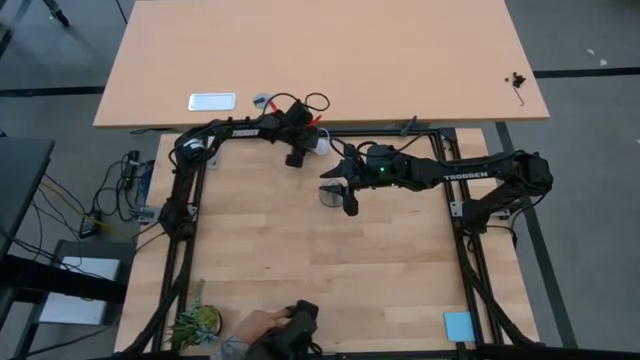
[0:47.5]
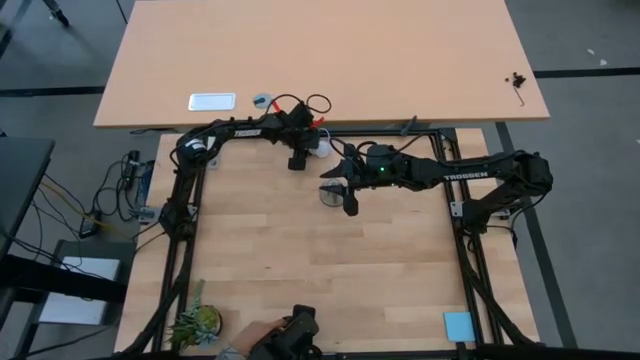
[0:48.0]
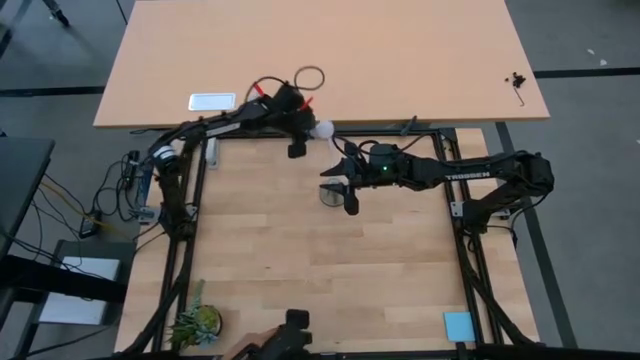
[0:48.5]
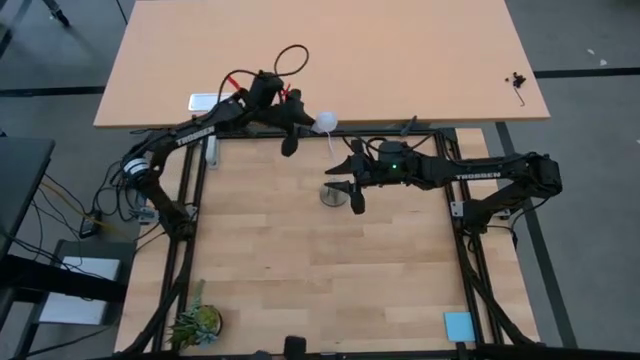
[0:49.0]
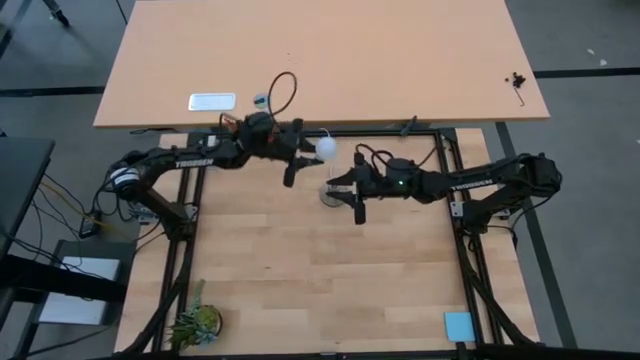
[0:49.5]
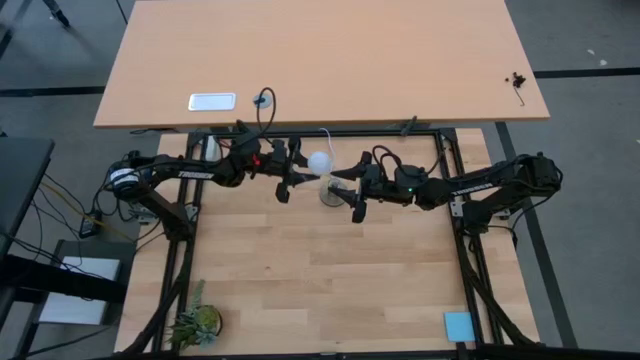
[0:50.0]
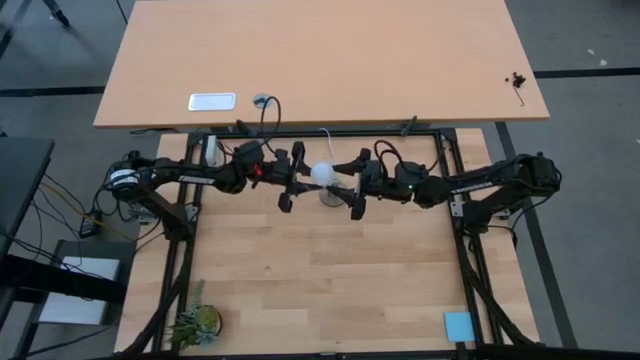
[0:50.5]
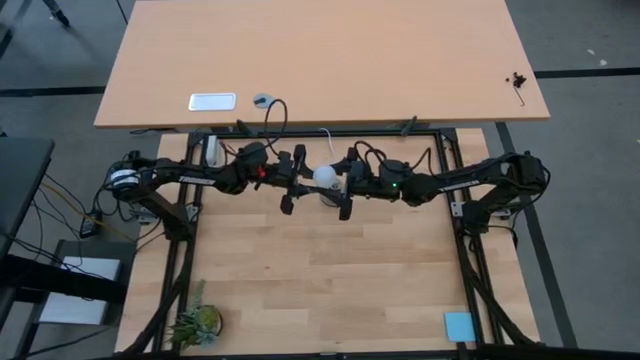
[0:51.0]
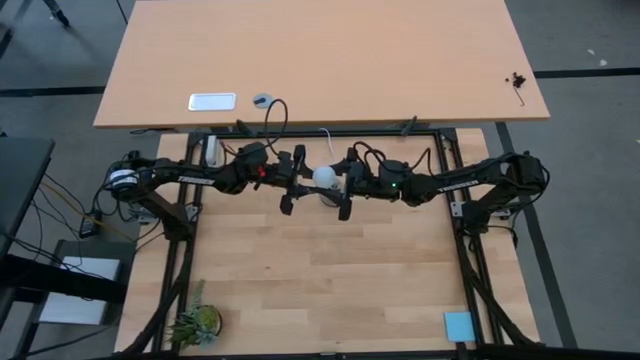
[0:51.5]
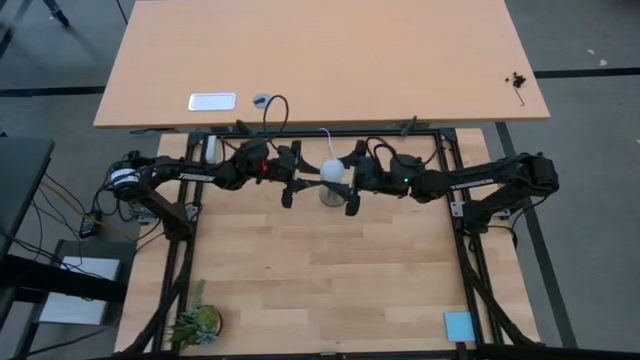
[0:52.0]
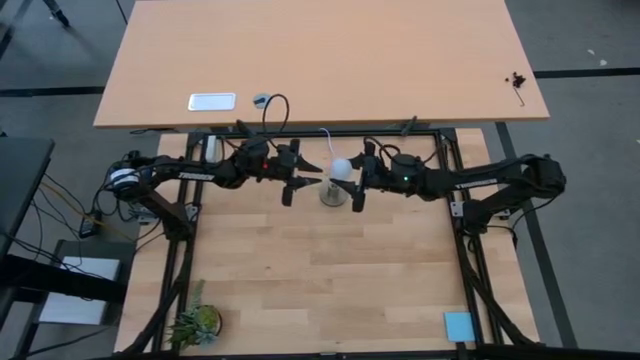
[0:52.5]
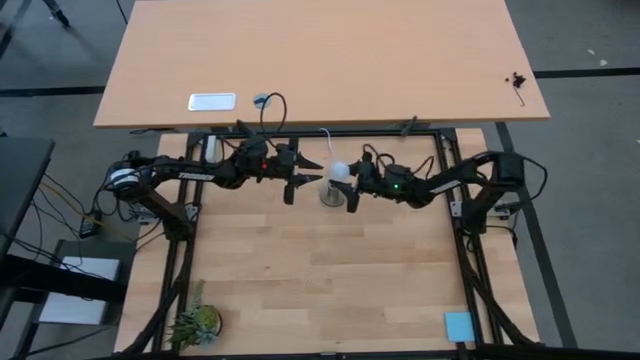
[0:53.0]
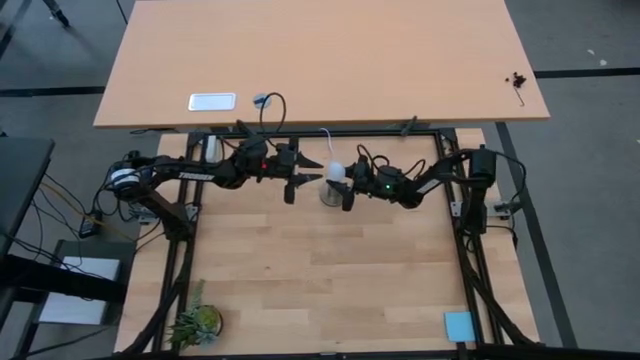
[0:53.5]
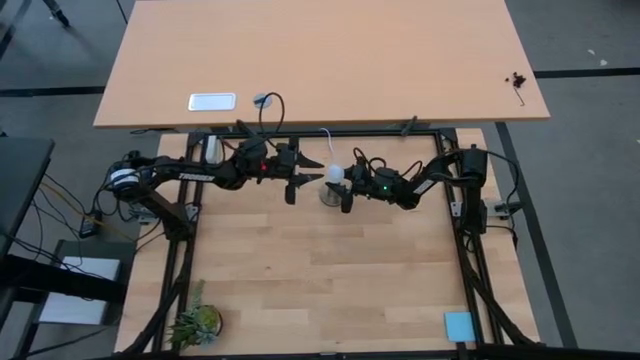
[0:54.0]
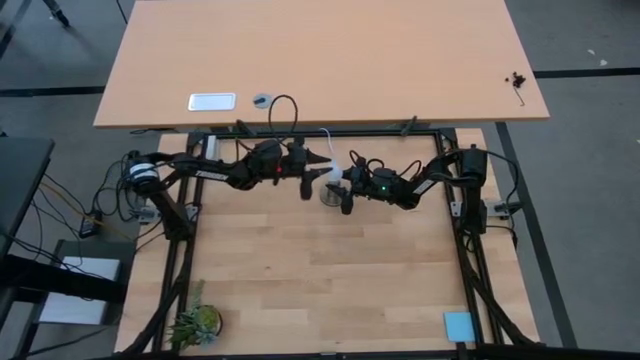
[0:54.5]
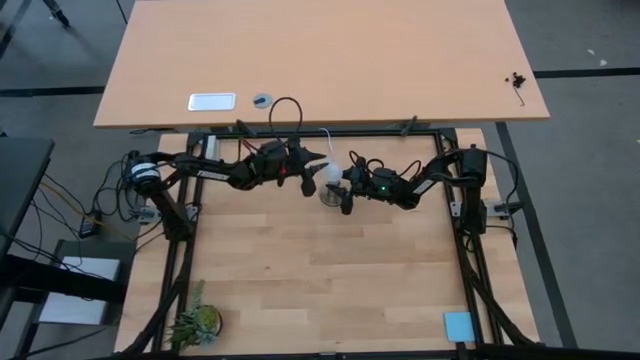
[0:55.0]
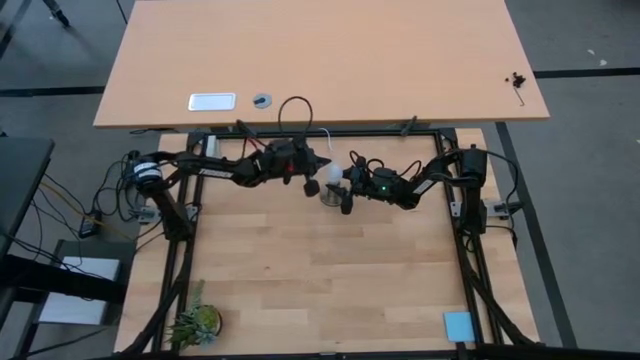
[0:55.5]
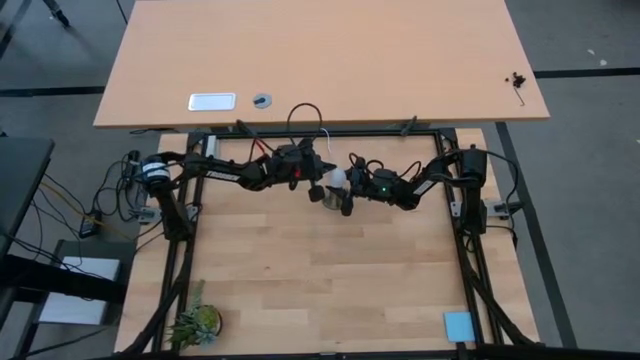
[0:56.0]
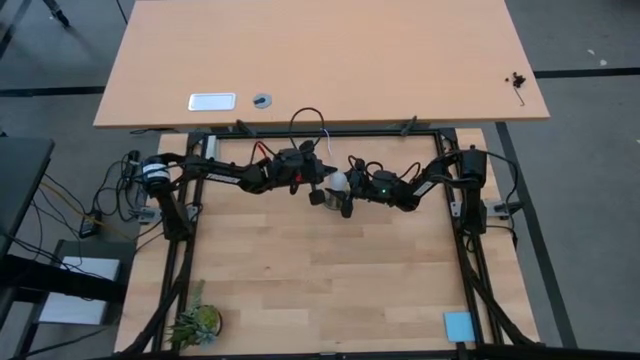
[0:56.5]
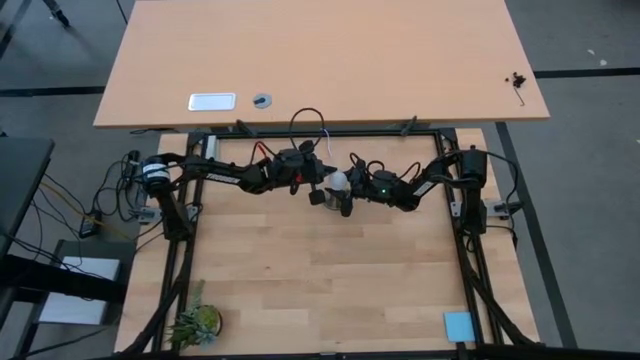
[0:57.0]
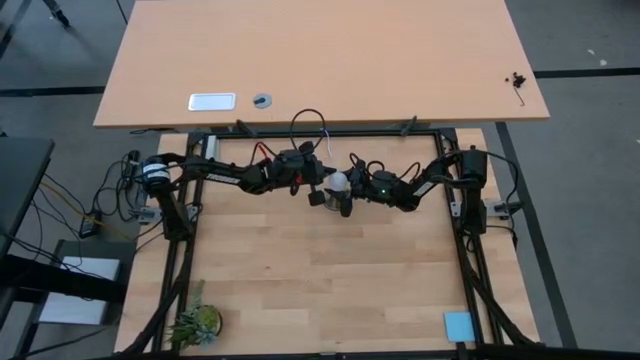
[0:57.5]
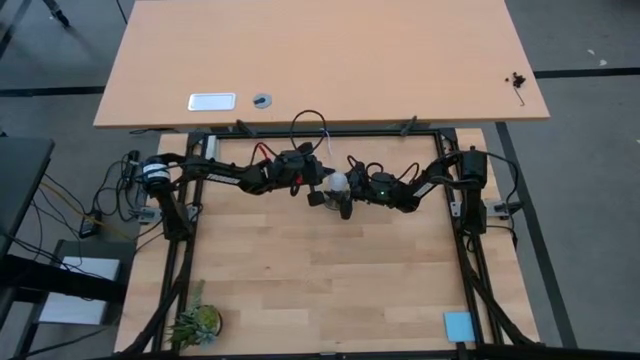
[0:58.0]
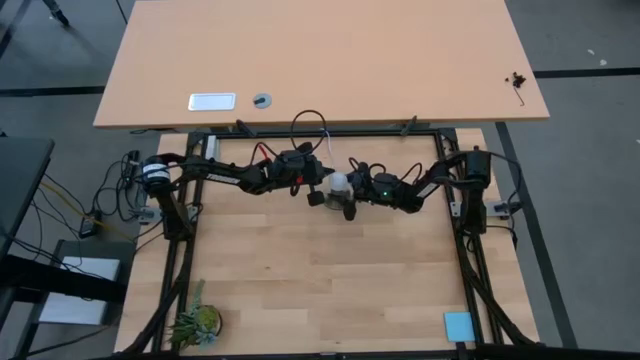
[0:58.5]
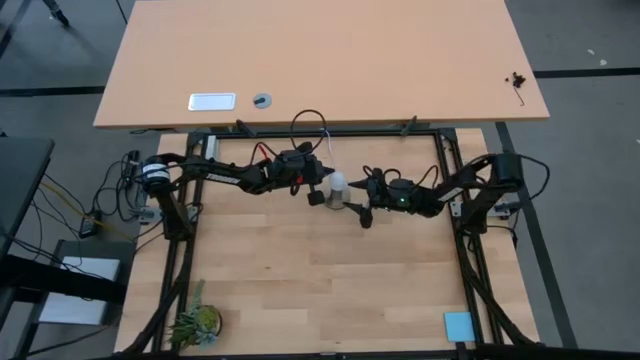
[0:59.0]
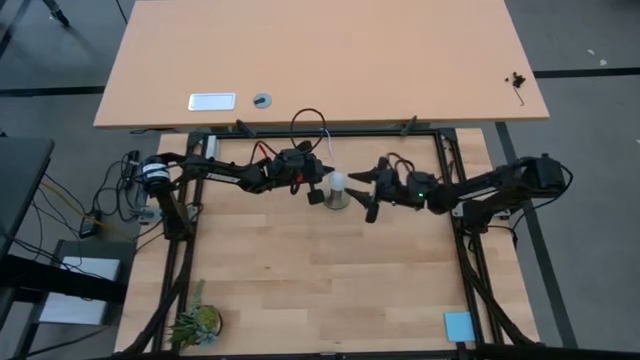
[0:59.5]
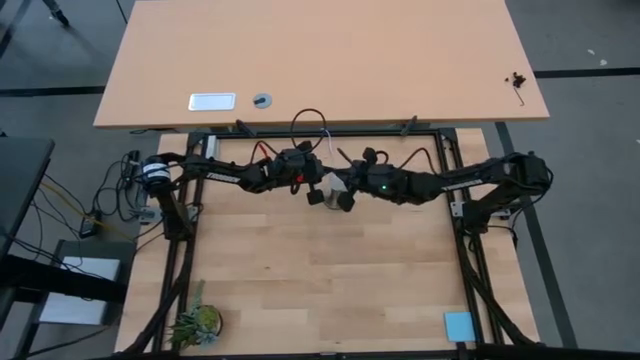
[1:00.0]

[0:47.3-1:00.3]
Task: Screw lightbulb
Insert the white lightbulb into the gold lamp

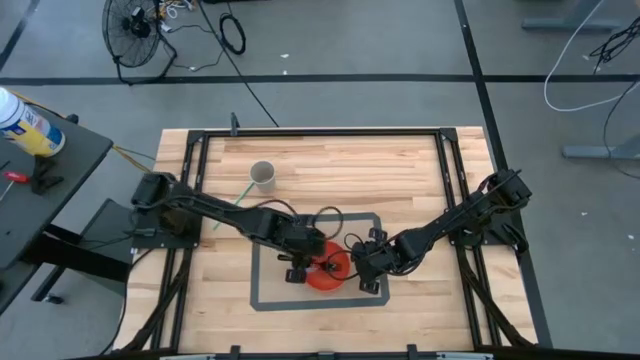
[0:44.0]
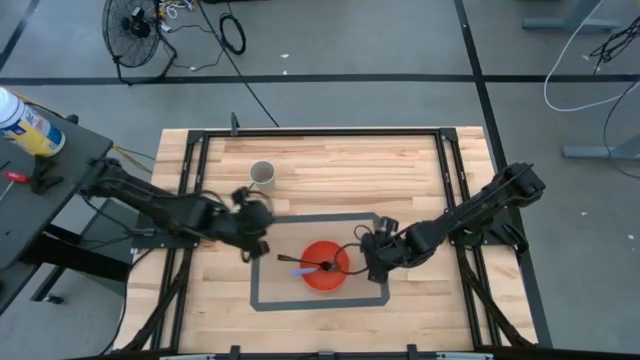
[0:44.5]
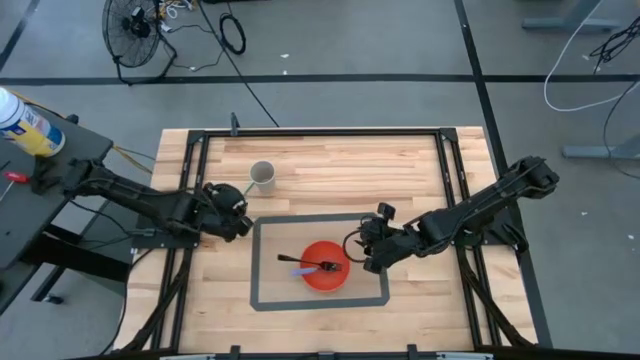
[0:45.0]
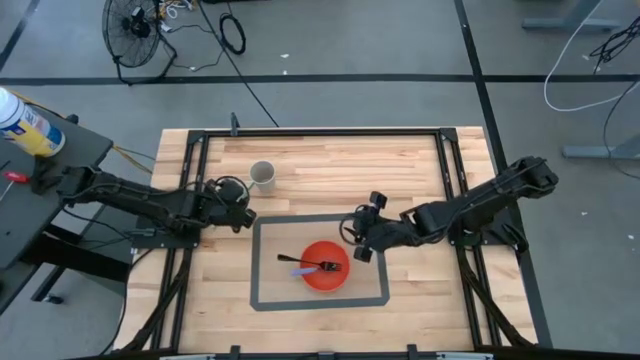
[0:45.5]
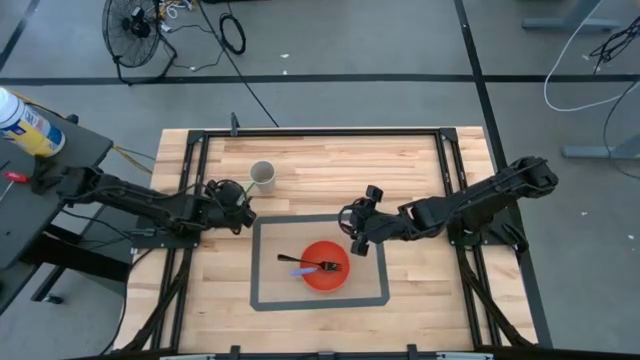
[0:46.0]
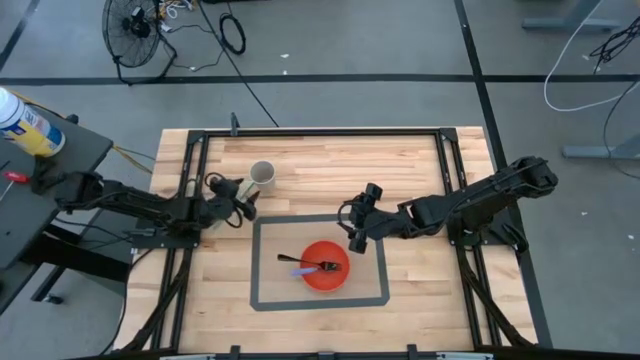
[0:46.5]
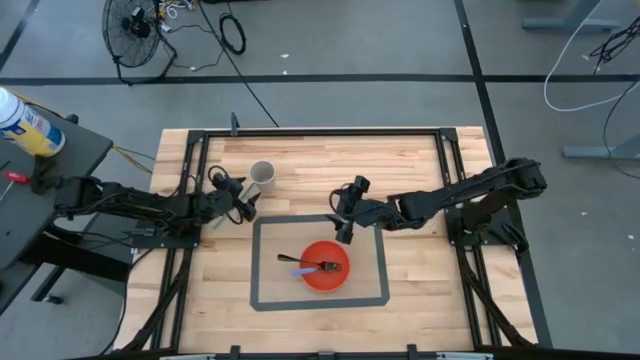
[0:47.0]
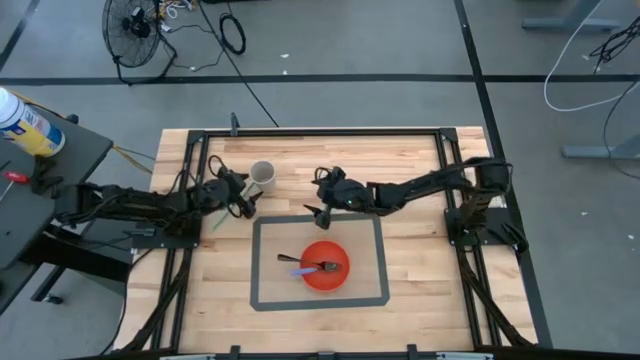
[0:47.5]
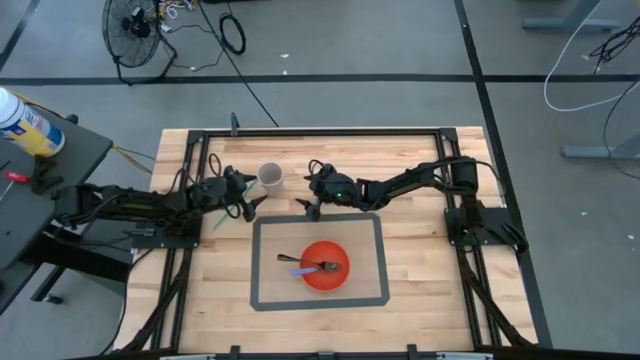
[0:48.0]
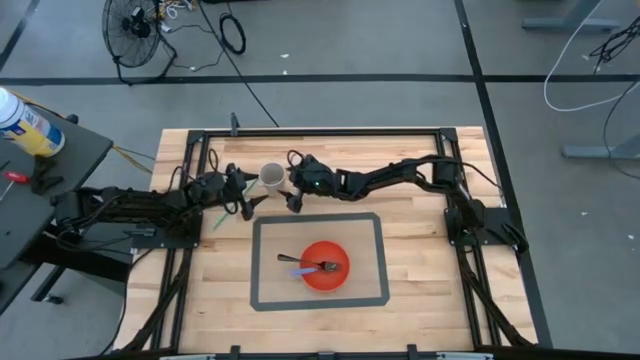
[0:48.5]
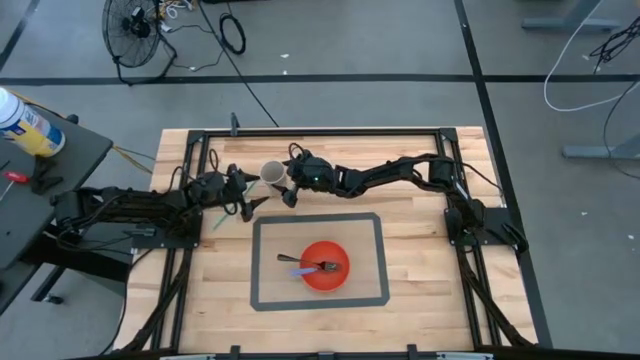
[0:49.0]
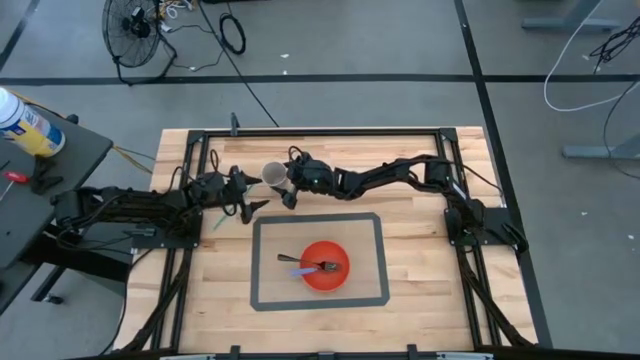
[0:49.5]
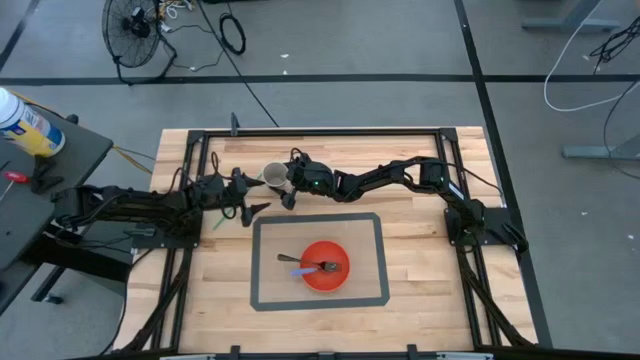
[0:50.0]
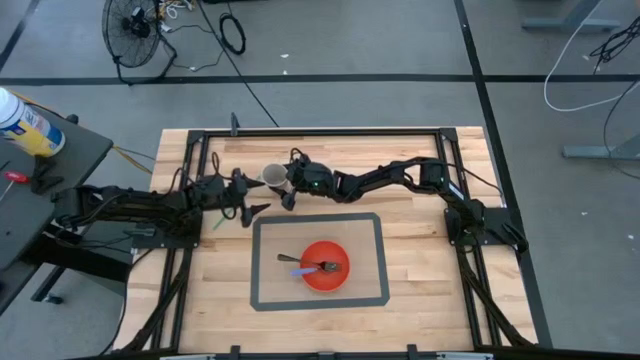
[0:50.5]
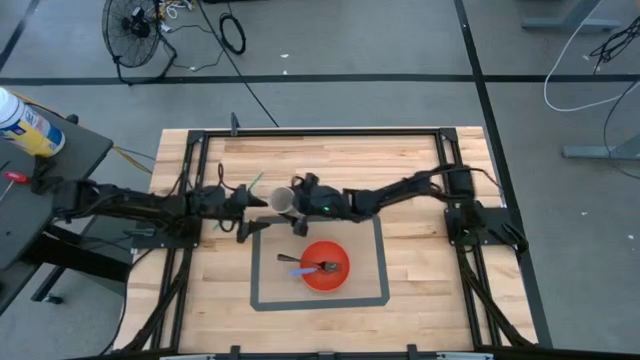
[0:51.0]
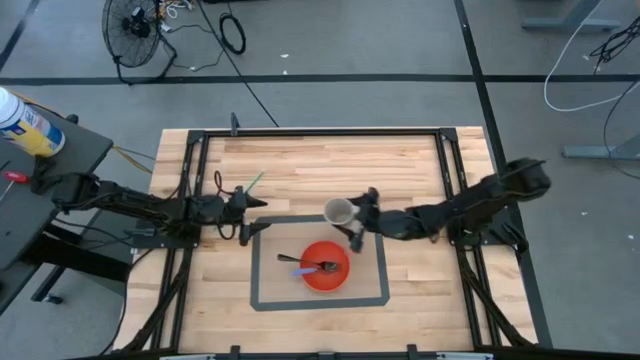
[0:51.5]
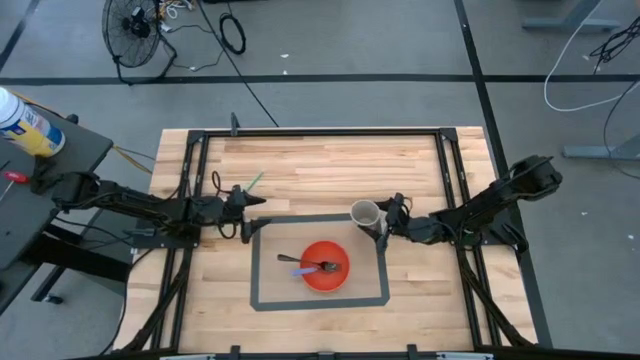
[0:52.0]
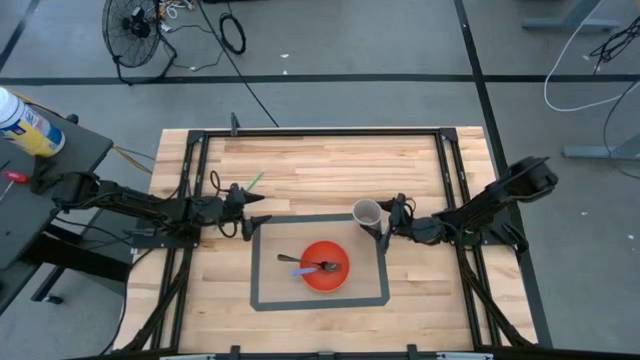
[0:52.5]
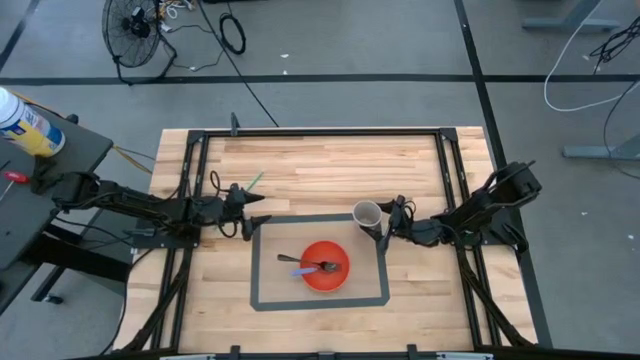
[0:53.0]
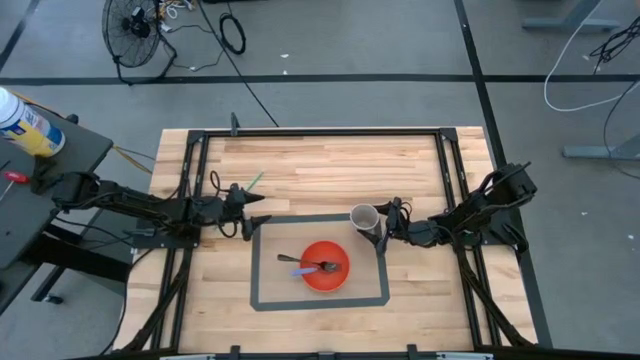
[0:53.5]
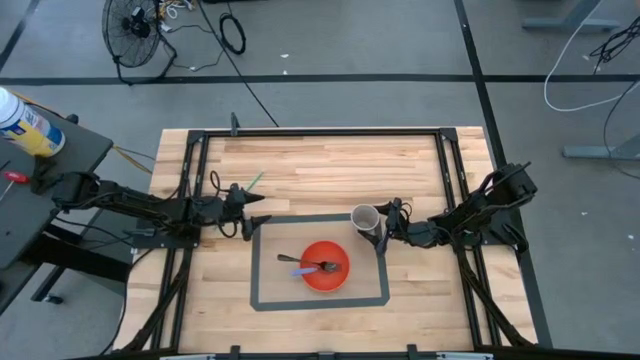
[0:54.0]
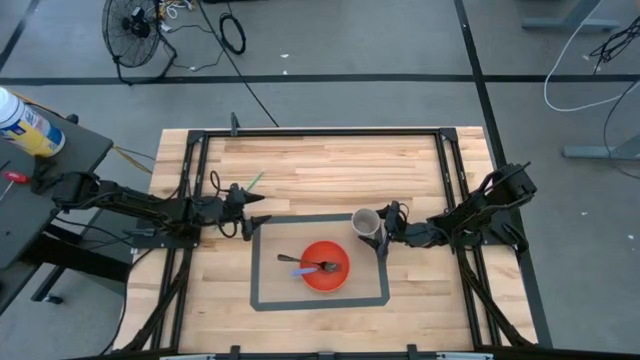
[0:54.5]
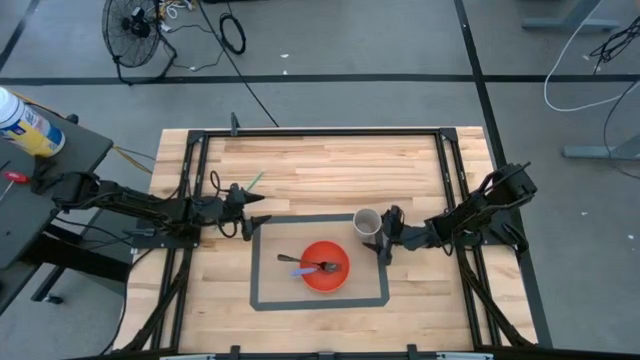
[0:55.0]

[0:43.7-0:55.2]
Task: Pick & Place Utensil
Put the white cup on the brown mat to the top right of the orange bowl
